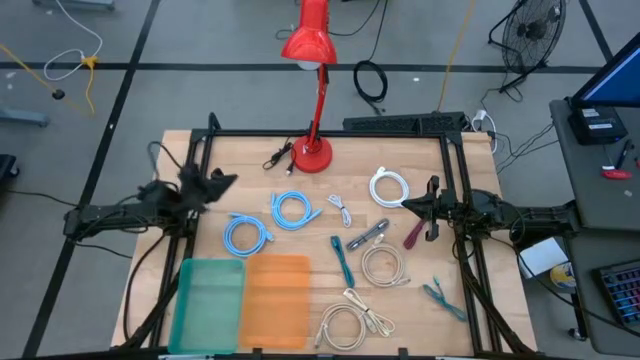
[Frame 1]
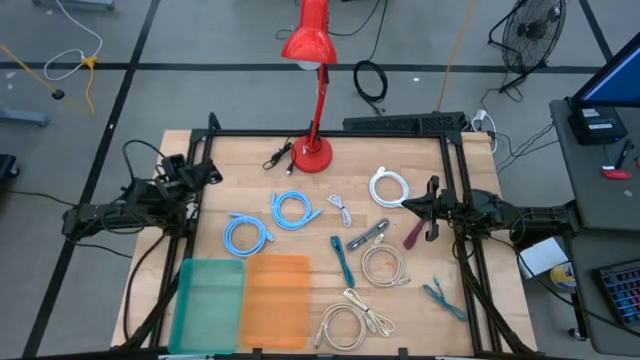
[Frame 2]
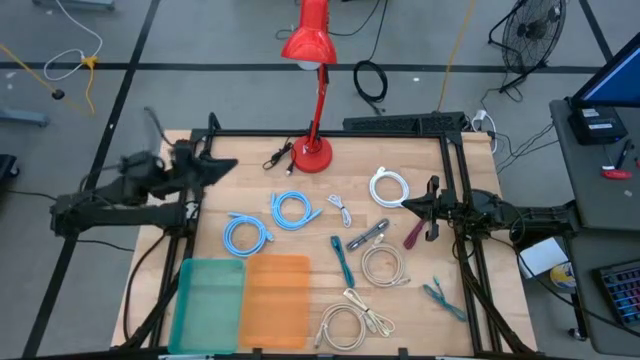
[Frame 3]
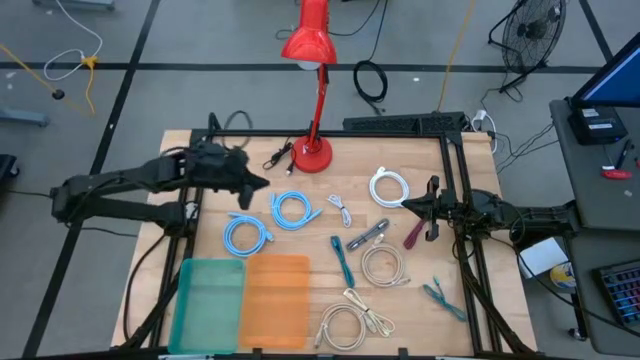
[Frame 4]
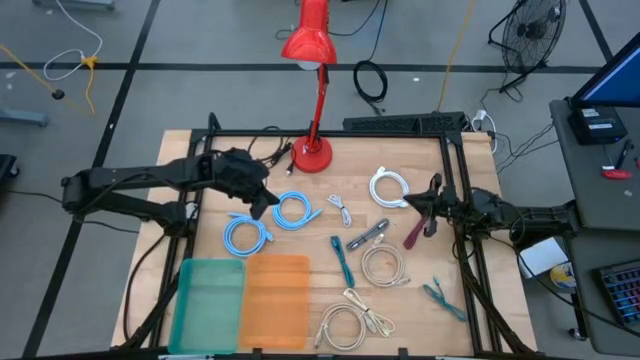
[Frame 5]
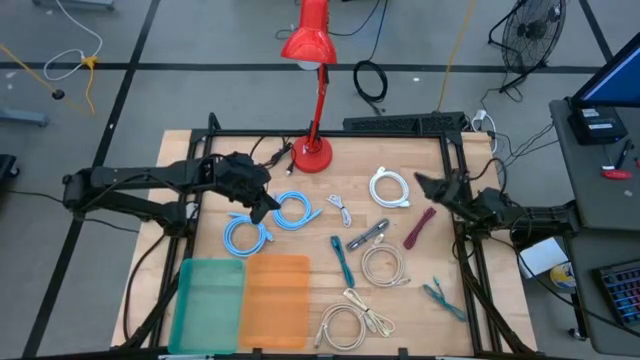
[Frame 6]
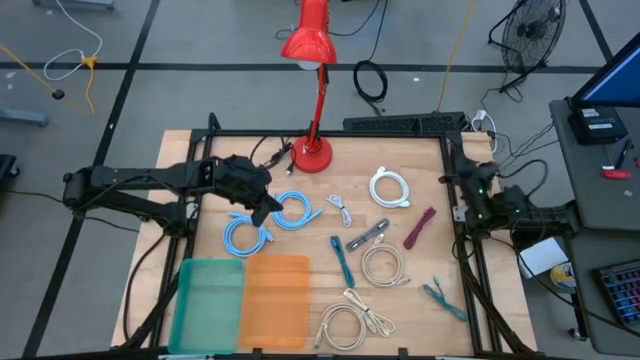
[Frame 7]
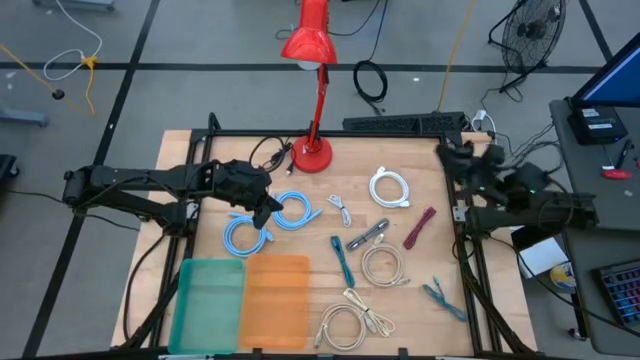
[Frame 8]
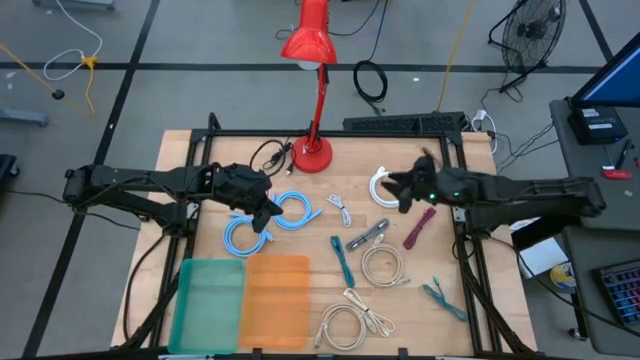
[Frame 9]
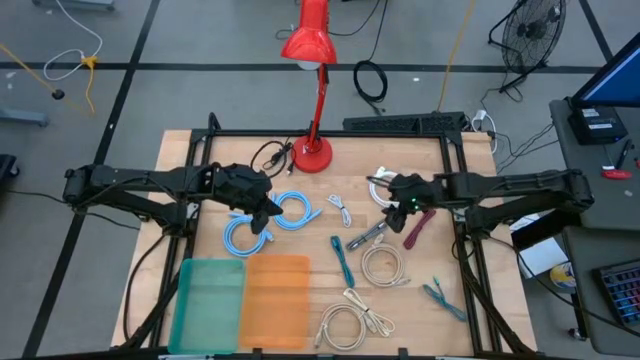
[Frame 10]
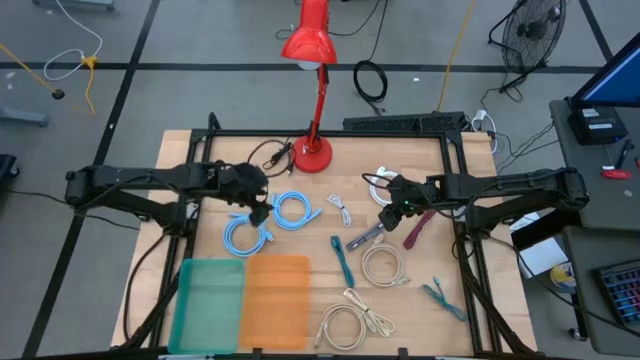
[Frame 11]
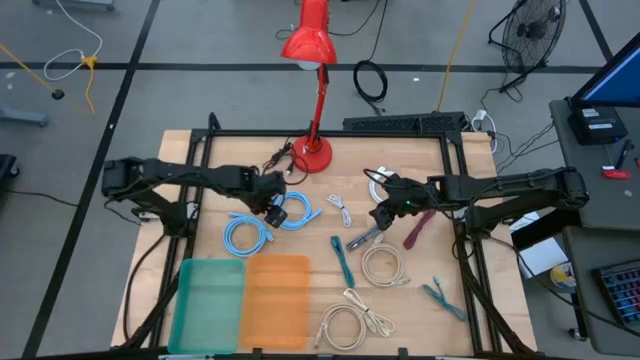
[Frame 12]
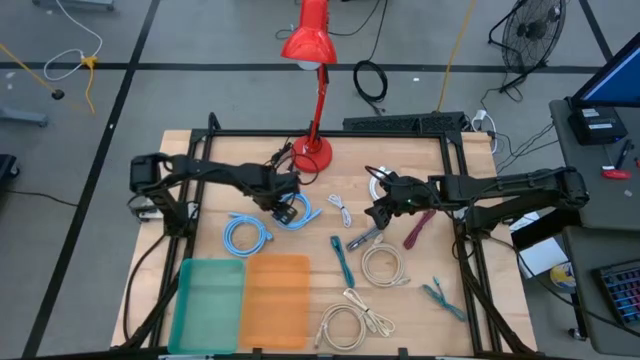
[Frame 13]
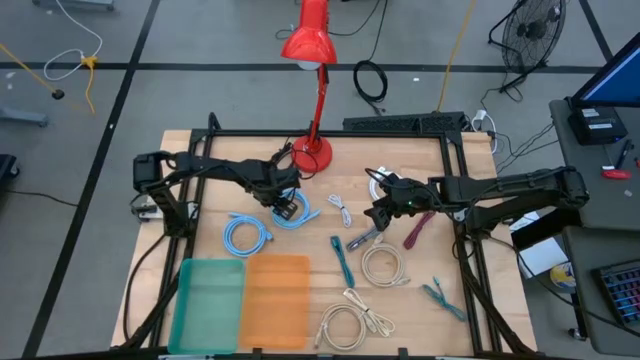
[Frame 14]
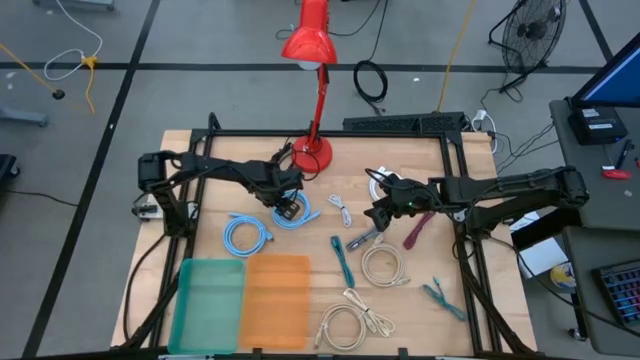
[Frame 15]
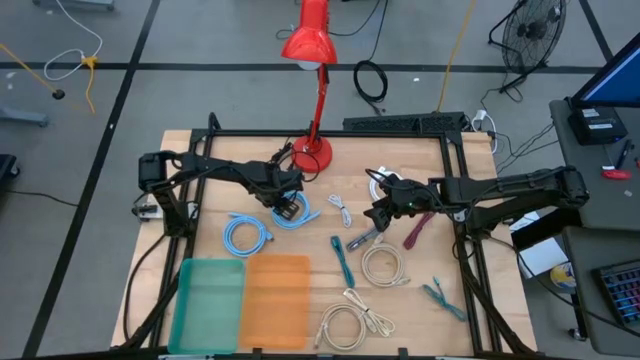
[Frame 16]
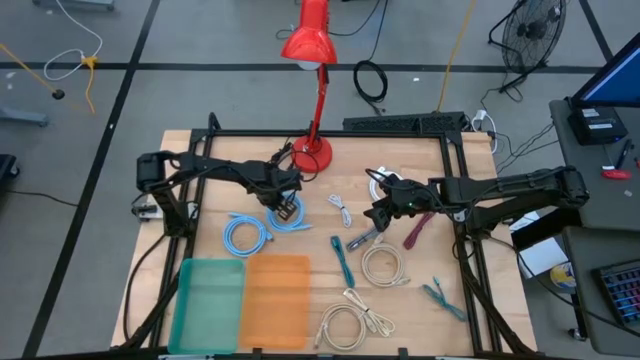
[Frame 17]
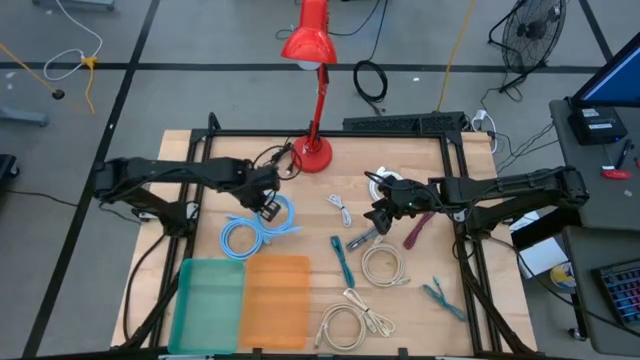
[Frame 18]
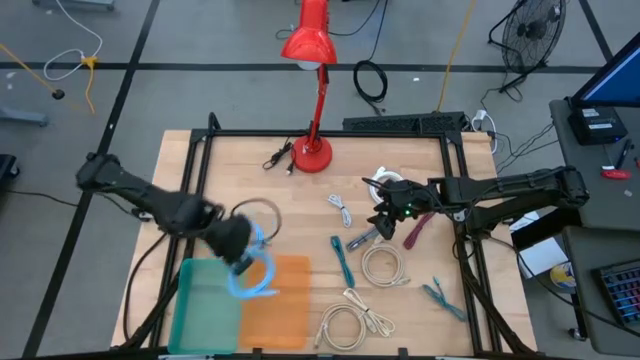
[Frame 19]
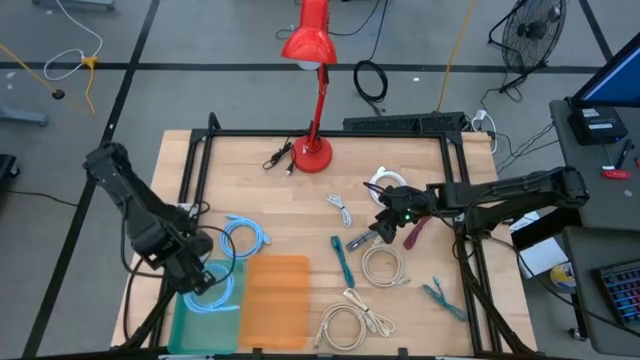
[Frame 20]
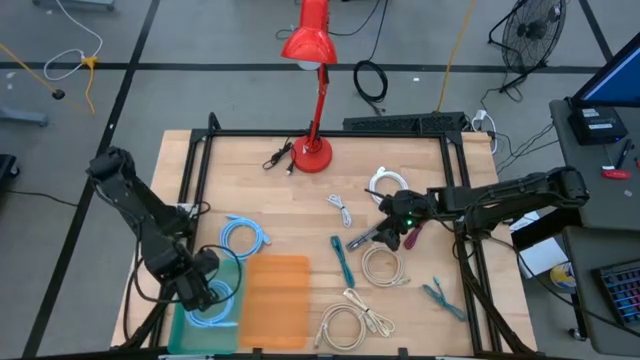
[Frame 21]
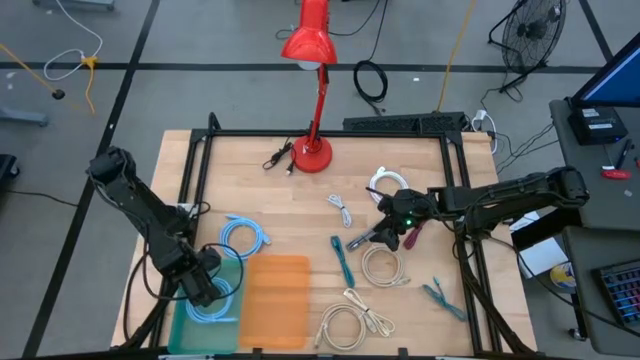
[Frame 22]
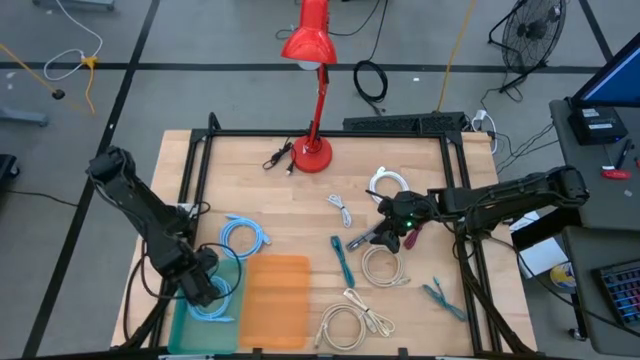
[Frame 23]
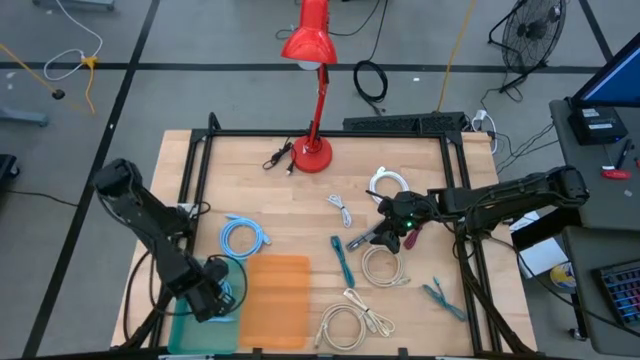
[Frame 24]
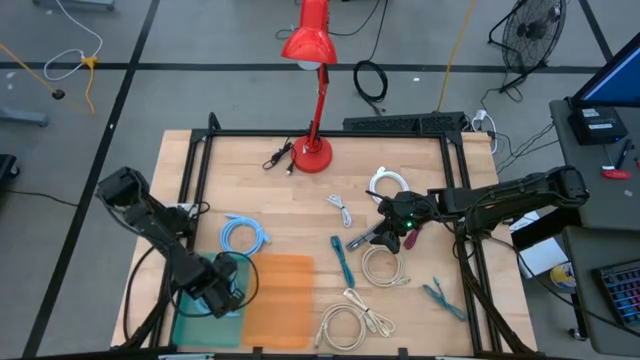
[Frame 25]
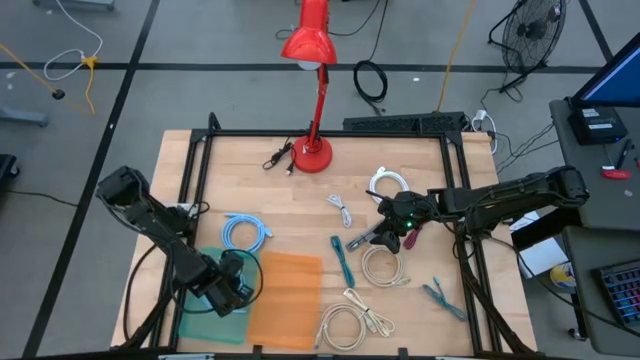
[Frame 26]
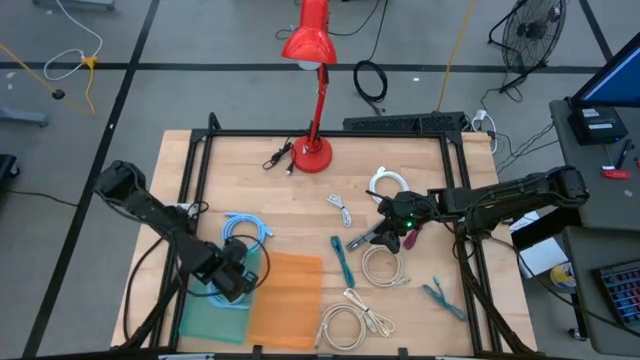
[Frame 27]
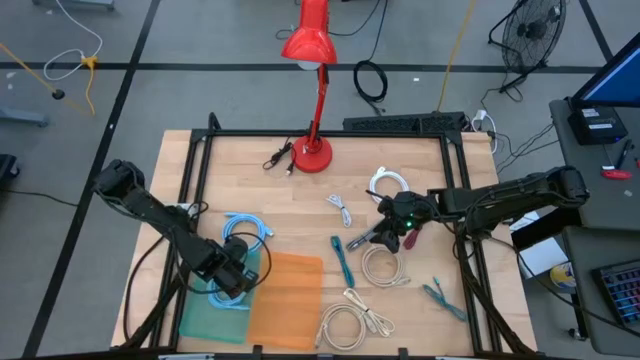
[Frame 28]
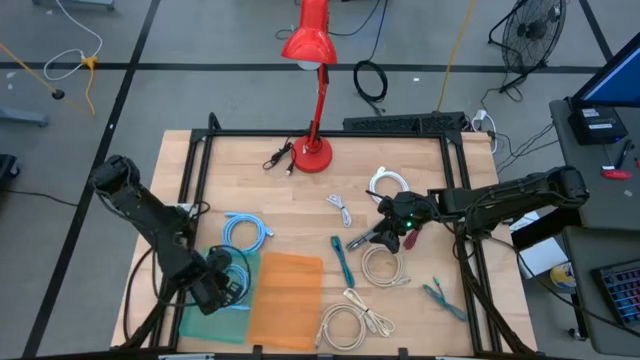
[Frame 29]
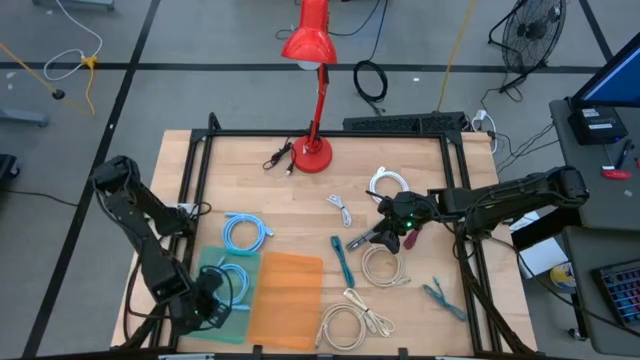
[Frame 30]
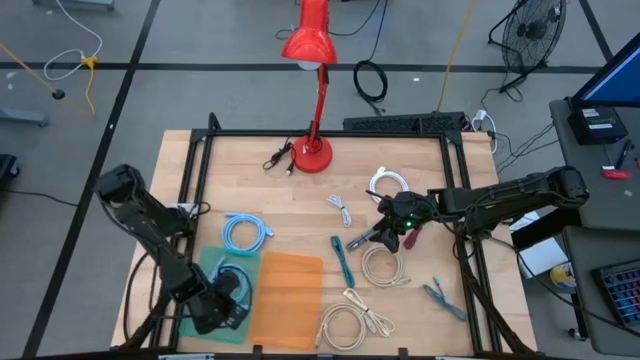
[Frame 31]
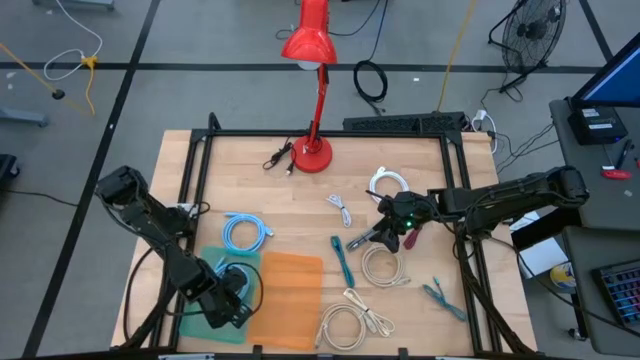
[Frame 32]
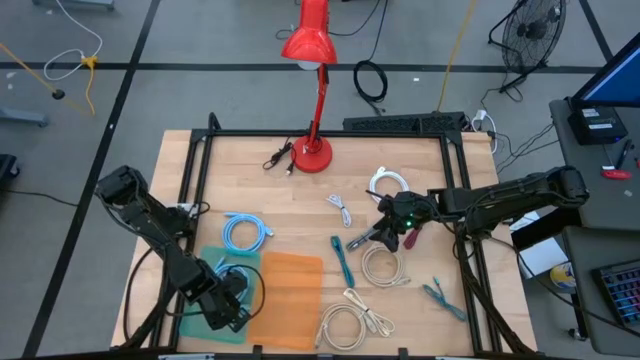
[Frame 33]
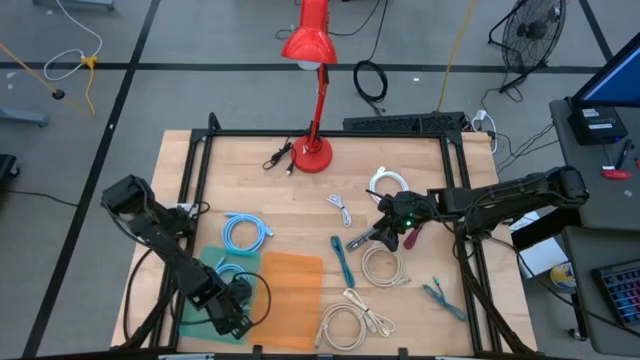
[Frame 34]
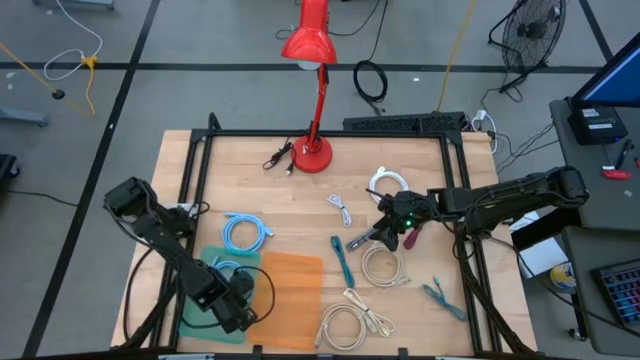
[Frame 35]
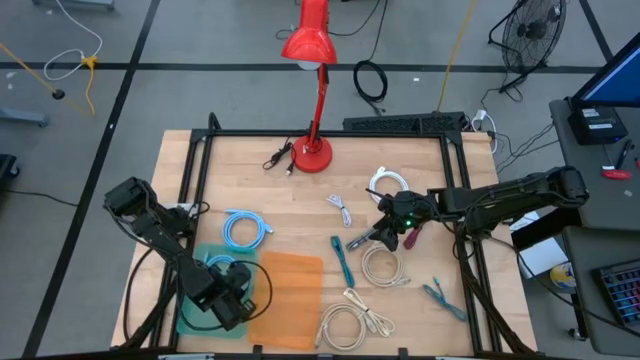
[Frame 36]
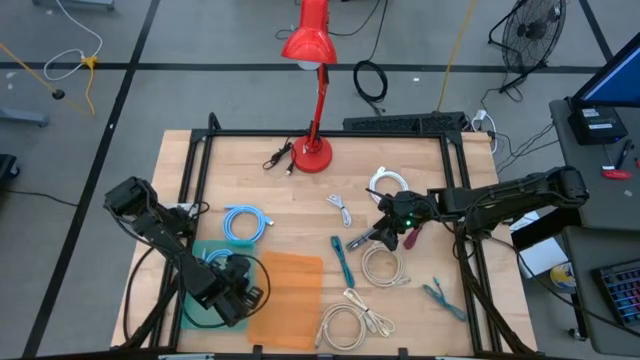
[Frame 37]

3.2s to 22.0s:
Task: Pick & Place USB Port
Put the top light blue USB cable into the blue bin

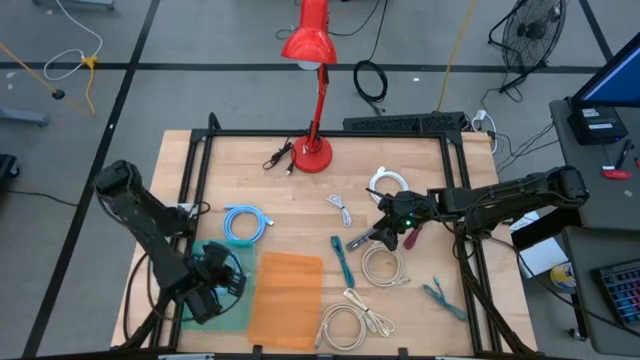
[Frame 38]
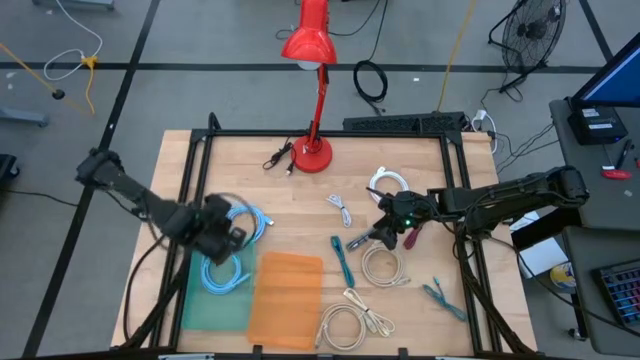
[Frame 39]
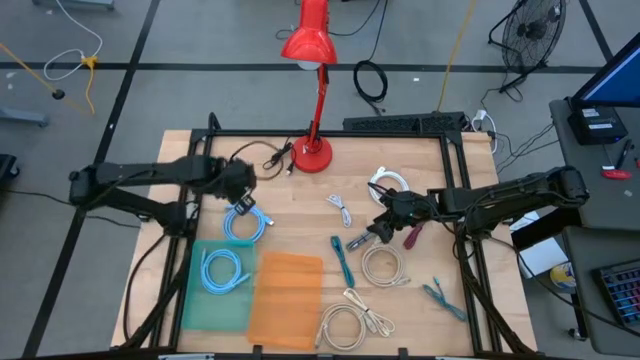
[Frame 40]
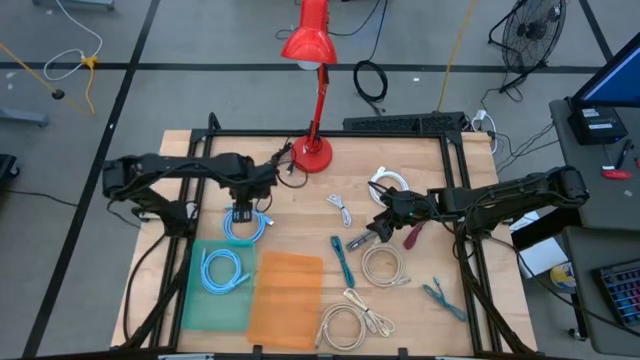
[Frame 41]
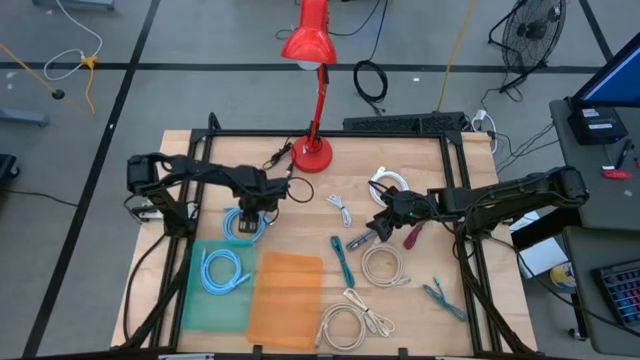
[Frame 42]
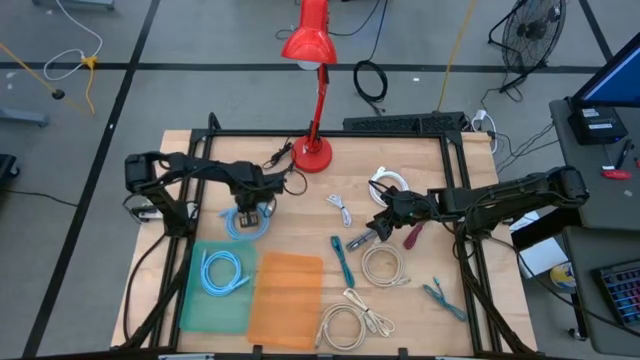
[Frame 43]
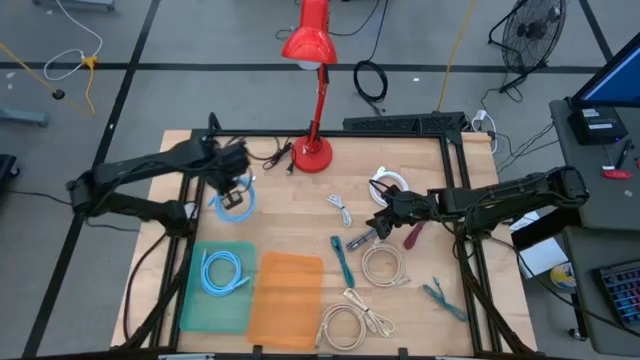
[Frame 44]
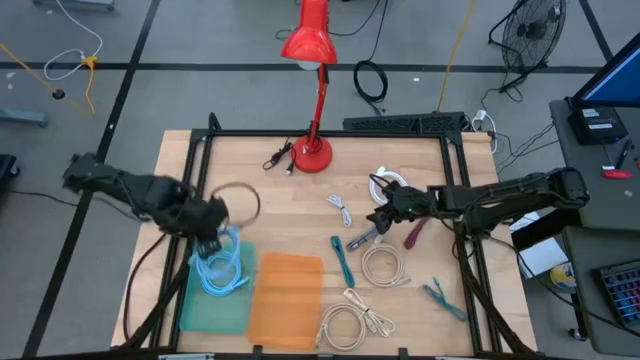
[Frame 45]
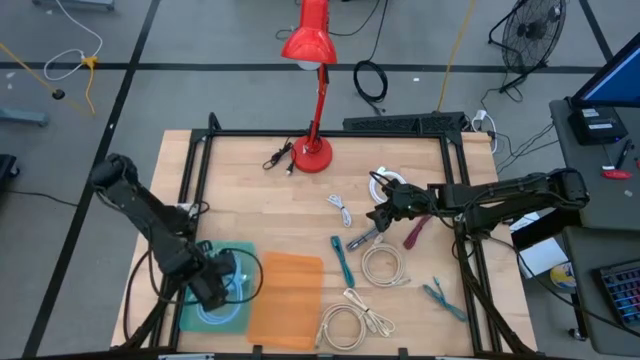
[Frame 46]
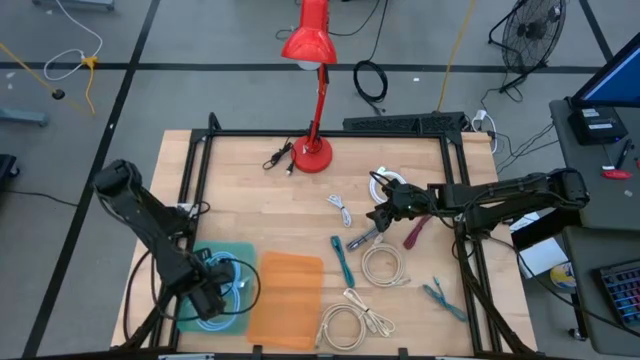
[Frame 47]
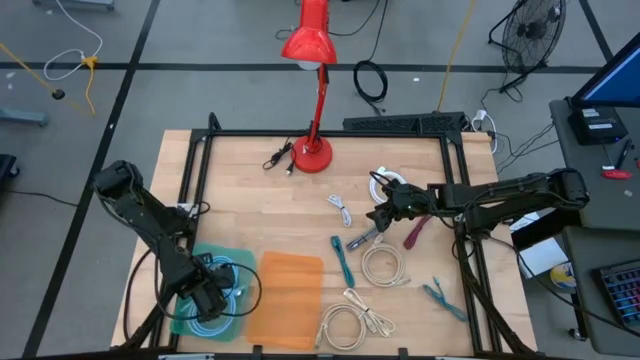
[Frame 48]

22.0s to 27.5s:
Put the light blue USB cable into the blue bin
